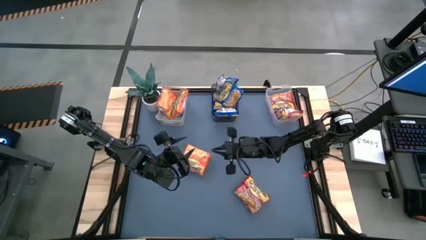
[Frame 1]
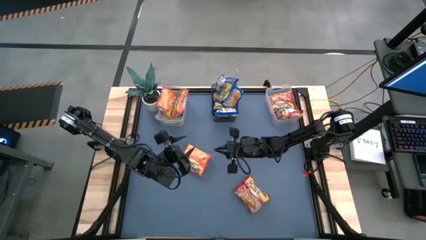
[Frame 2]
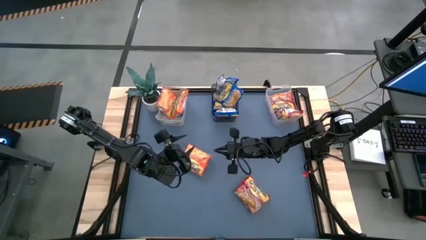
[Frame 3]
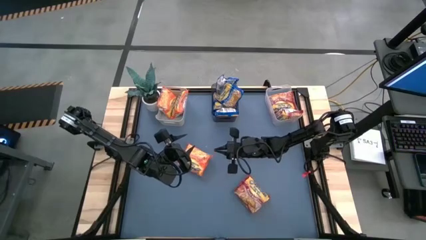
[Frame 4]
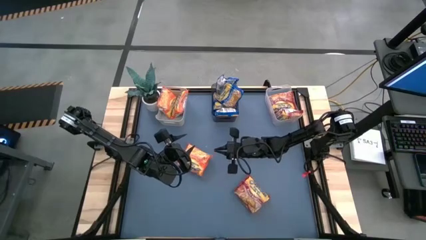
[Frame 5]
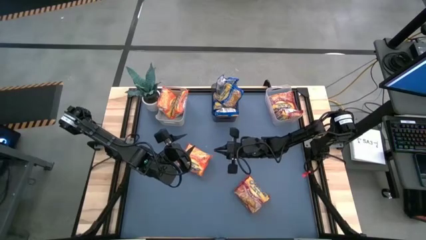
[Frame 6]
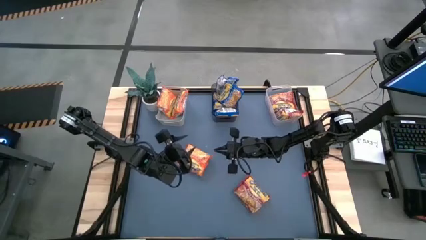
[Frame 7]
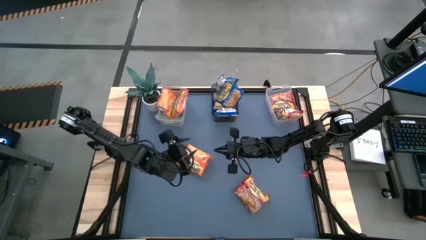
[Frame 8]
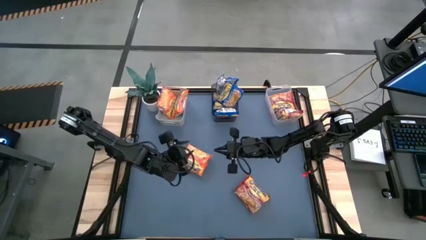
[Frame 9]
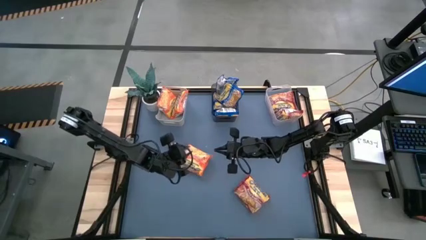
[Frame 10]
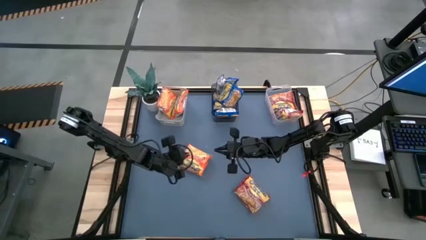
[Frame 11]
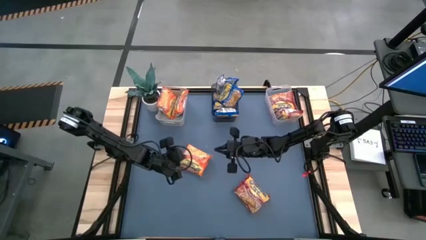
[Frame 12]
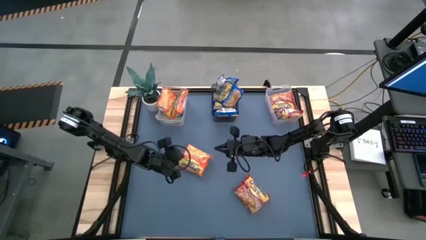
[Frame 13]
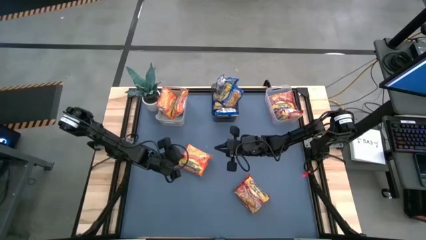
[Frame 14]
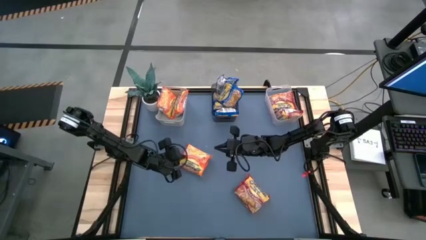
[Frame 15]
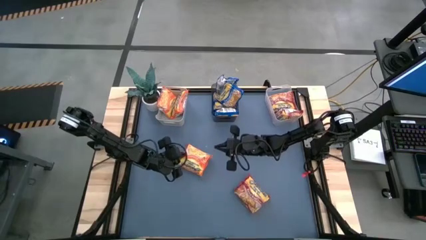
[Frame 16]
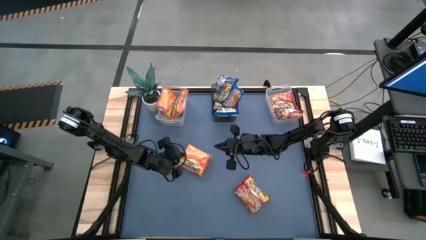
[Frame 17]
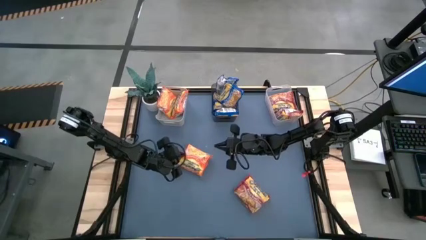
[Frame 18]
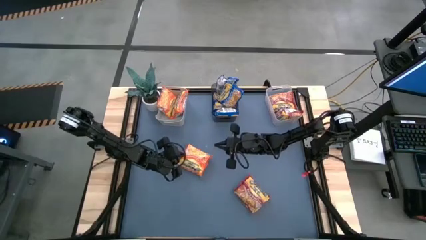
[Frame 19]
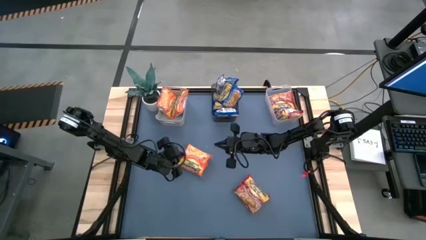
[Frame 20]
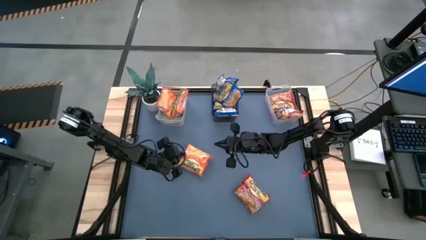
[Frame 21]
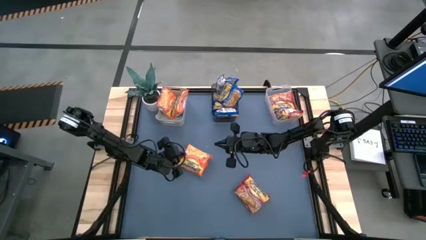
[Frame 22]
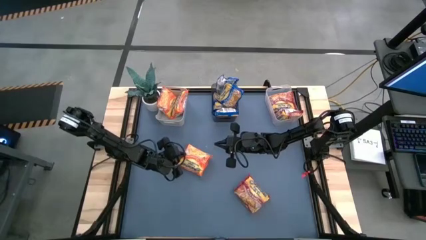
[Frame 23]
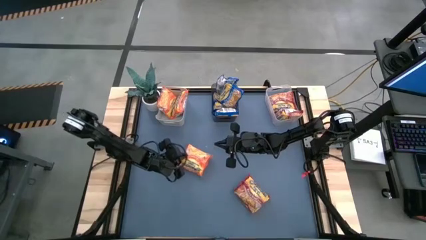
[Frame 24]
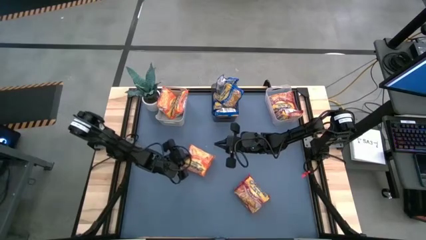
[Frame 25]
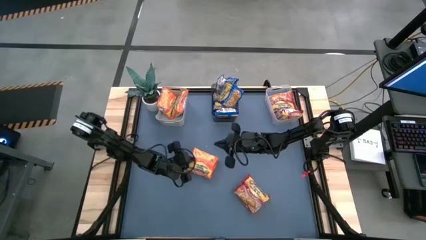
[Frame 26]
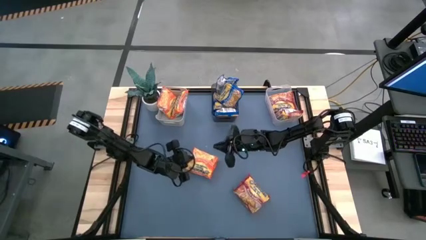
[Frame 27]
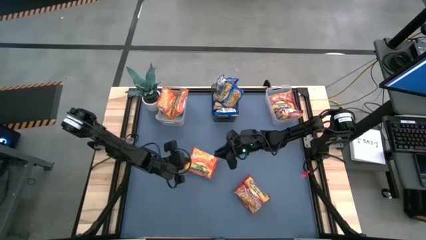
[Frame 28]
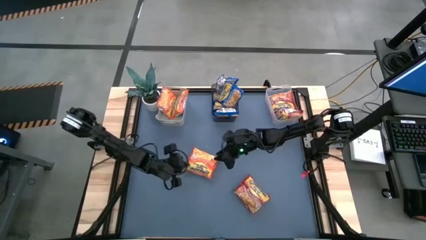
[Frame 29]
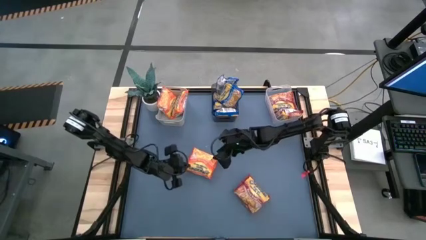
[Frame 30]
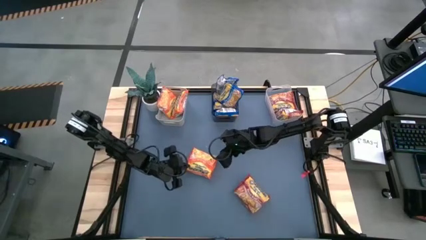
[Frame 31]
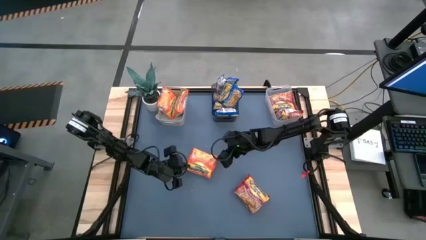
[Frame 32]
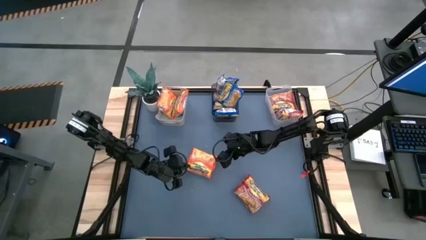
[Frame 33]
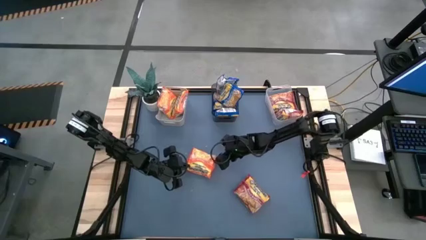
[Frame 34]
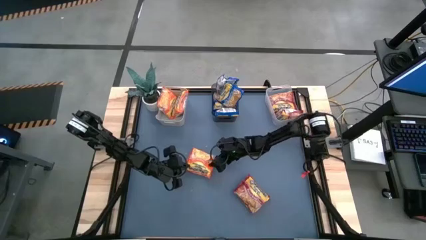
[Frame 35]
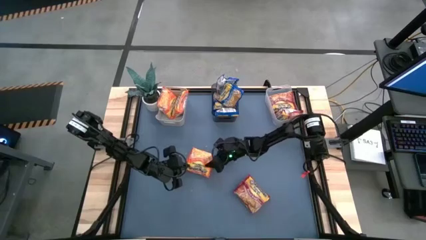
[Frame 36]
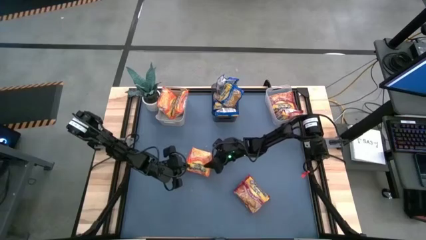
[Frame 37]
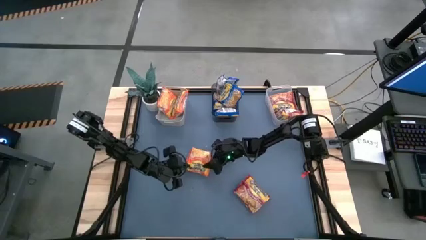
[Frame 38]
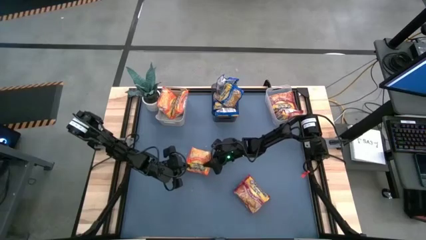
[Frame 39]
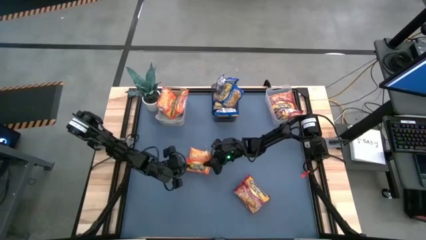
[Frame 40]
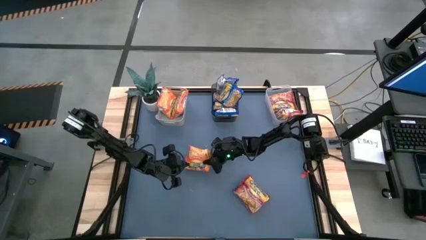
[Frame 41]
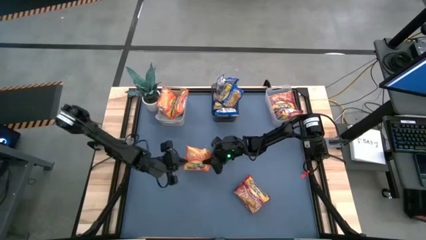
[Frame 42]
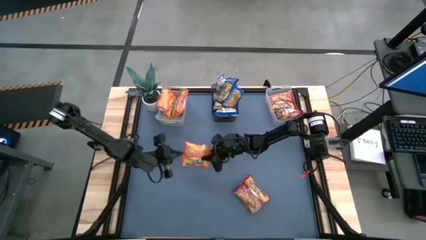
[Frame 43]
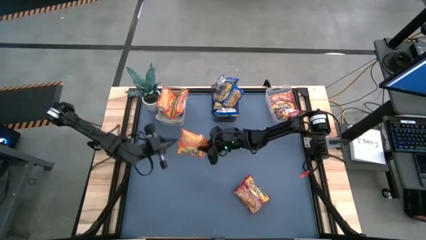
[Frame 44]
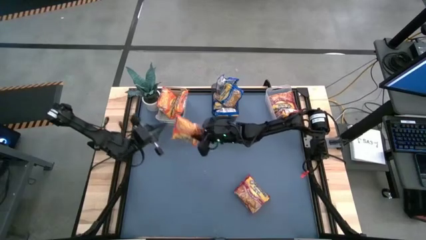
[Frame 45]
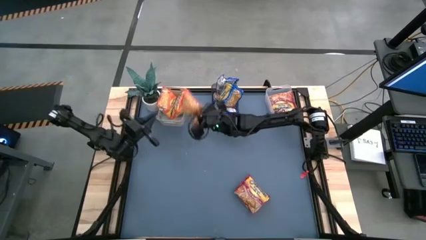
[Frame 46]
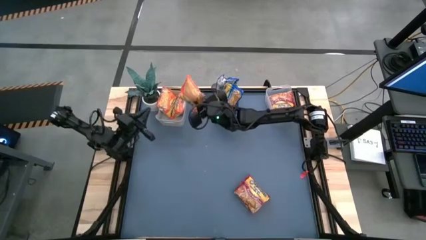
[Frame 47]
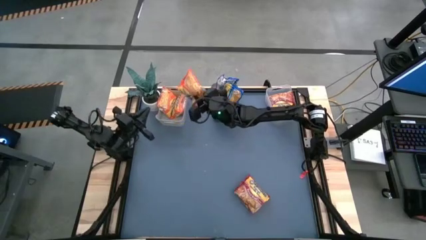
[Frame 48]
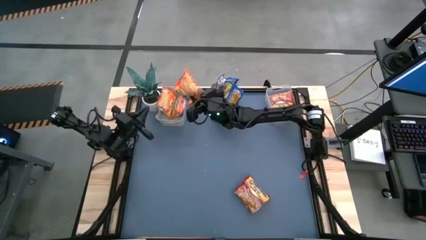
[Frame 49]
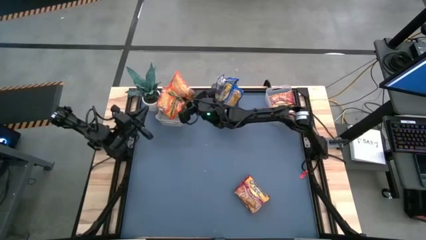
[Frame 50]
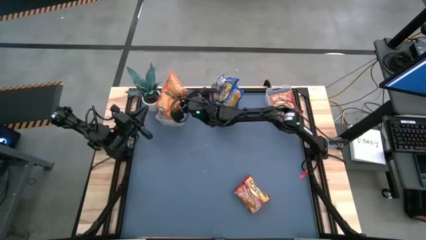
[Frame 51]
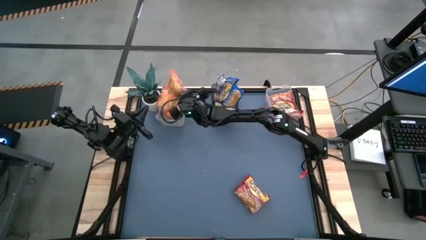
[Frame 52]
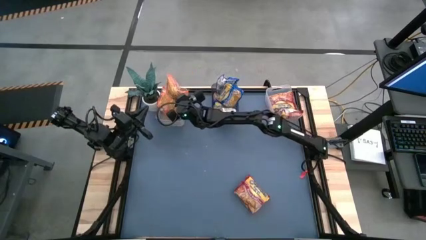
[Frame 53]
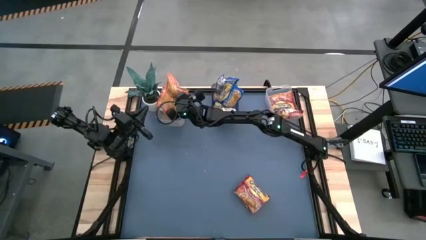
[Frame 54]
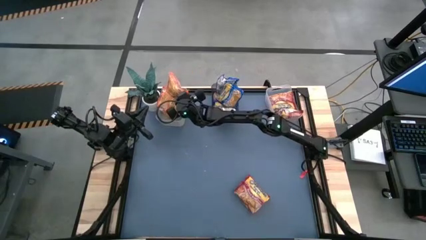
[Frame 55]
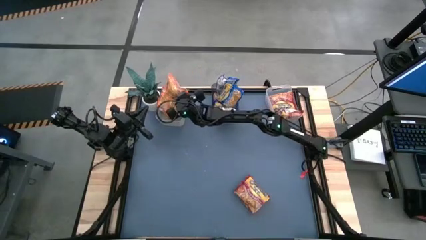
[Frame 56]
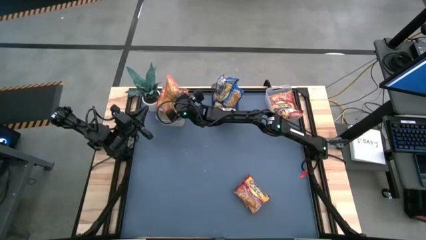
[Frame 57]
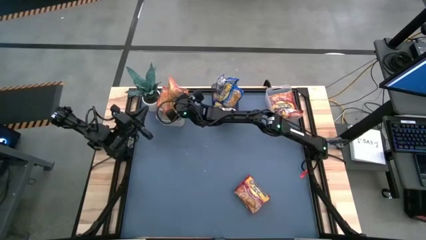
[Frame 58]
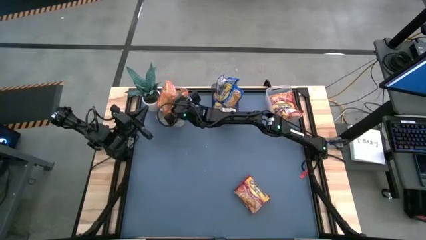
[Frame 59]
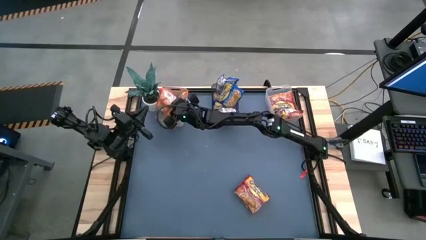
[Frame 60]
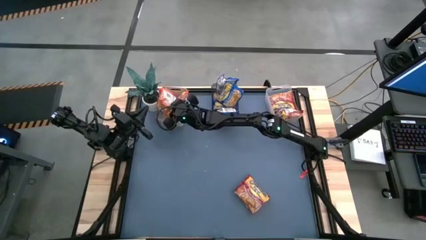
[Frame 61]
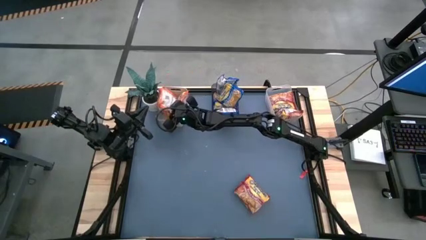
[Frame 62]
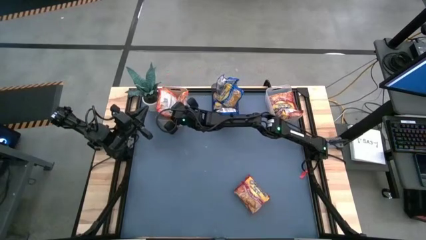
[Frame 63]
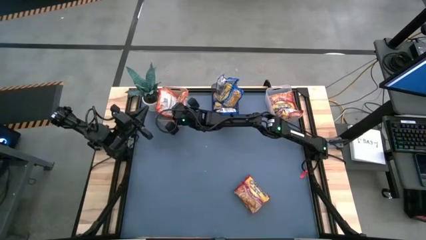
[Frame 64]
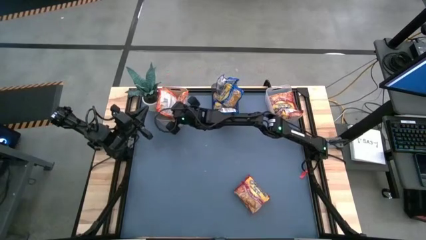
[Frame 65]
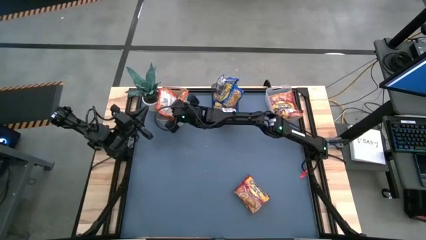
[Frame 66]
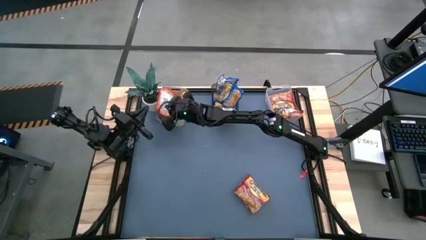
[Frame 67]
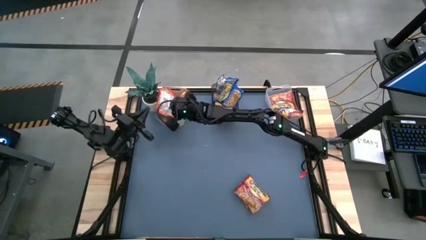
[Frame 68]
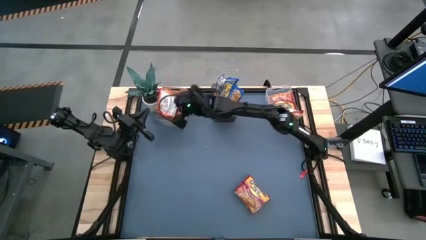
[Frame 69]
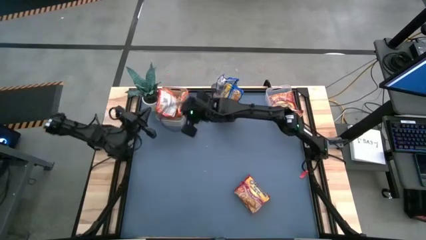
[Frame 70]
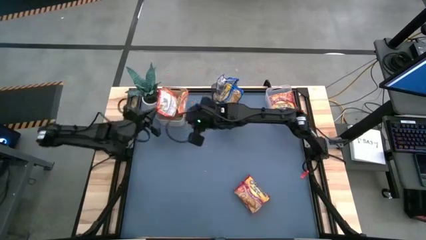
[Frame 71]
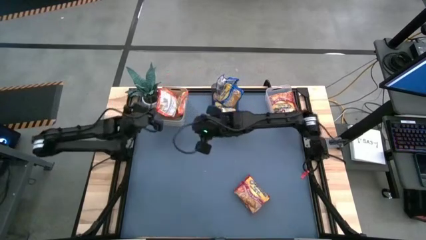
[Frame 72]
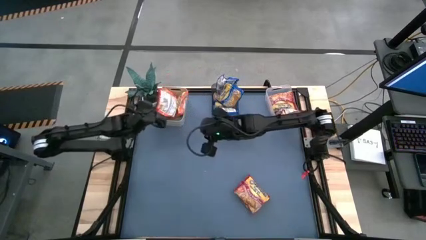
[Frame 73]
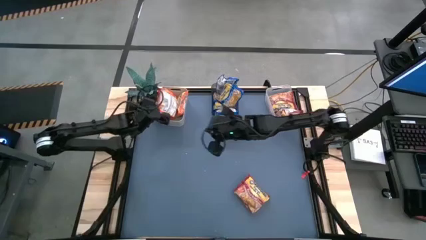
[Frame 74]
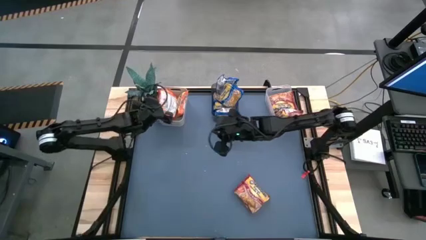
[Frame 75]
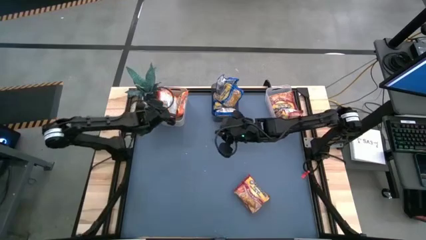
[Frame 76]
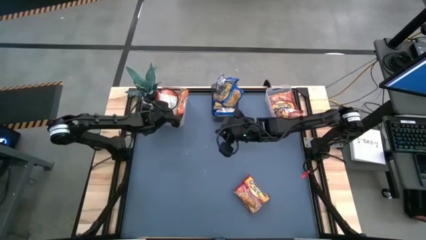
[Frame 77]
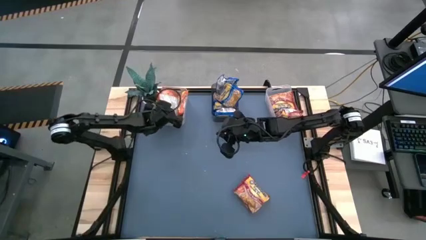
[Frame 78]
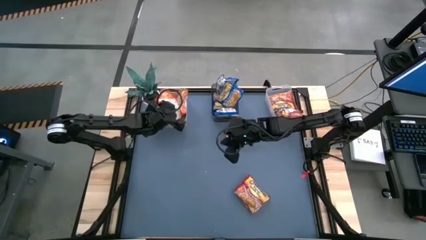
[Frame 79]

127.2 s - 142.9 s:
Task: Sort Maruchan noodles
Put the orange noodle pack into the gray bin

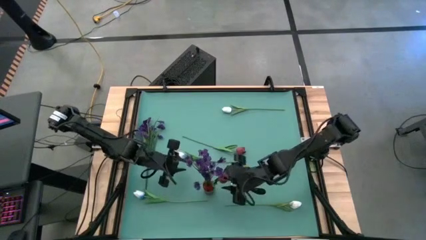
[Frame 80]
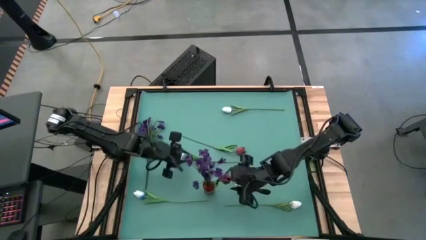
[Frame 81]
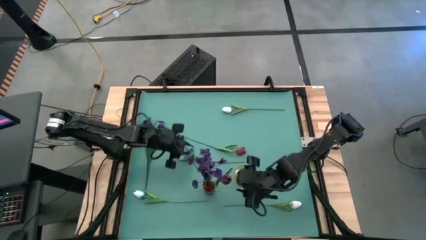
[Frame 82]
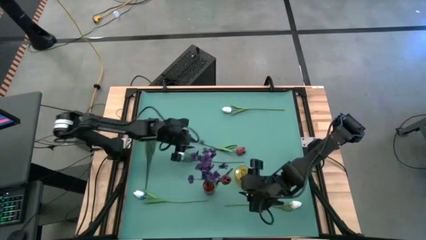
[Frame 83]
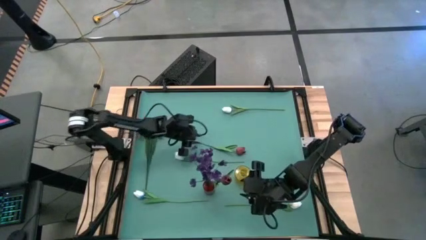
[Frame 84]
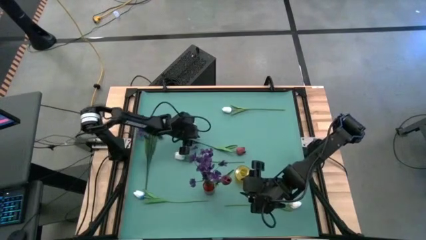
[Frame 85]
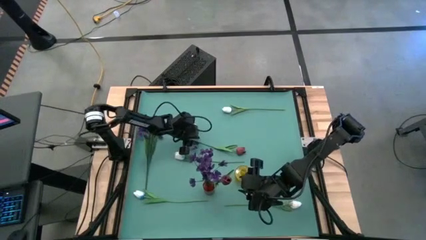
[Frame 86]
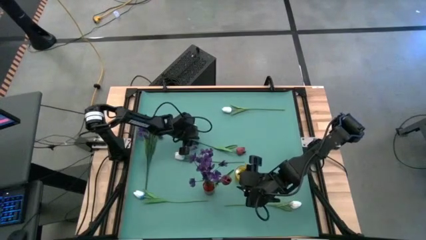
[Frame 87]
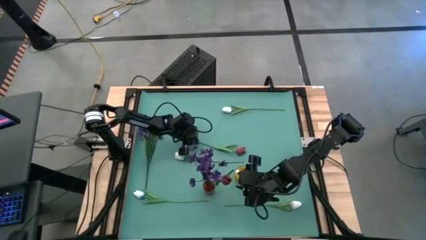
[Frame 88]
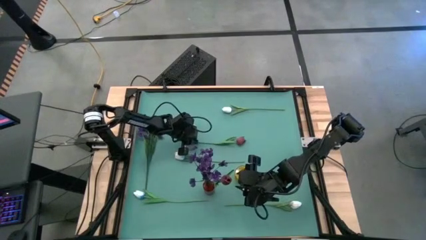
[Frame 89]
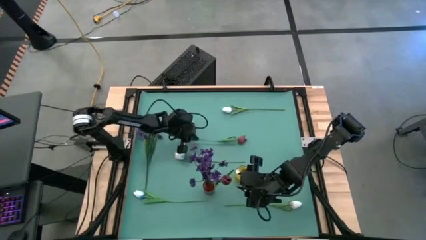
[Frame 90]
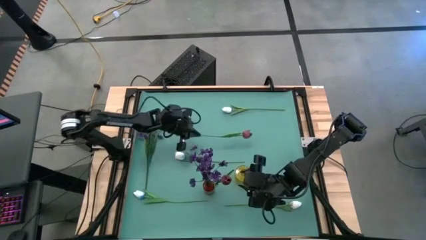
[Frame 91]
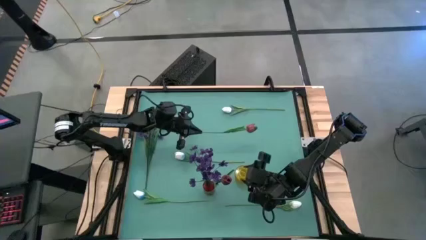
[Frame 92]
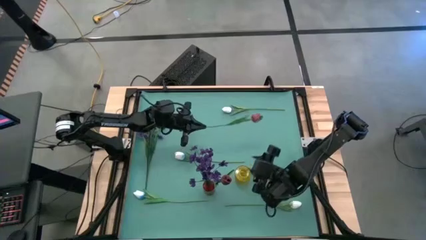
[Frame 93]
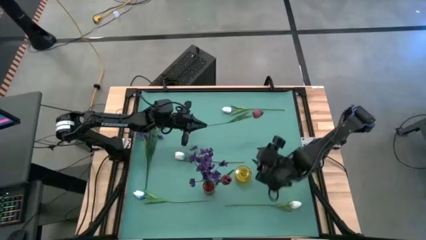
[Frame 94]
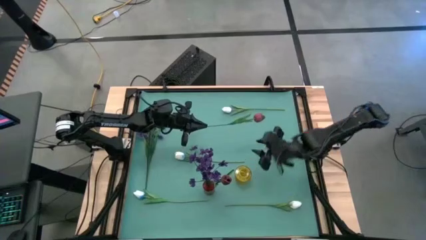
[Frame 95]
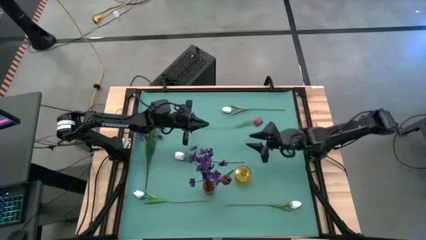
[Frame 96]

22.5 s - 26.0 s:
Task: Sort flowers into vase by color
Put the red flower into the red flower vase
